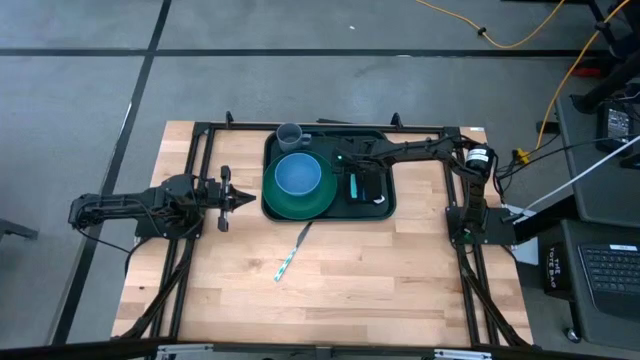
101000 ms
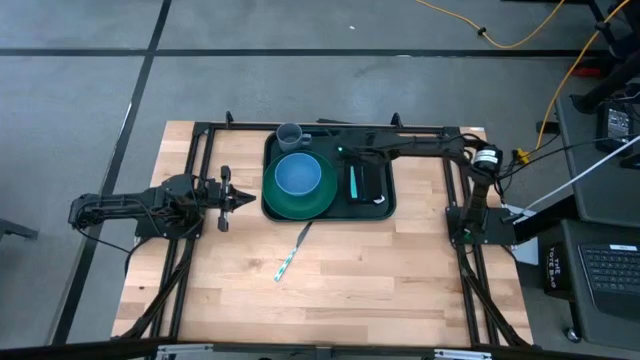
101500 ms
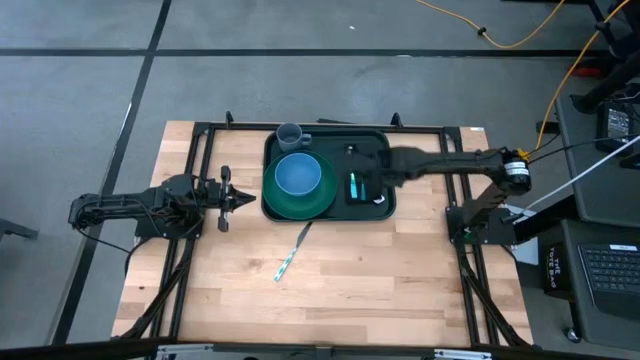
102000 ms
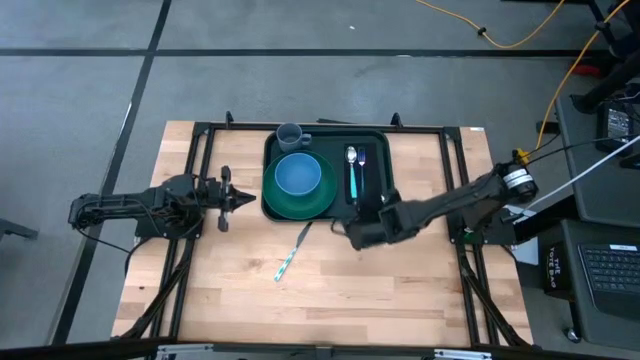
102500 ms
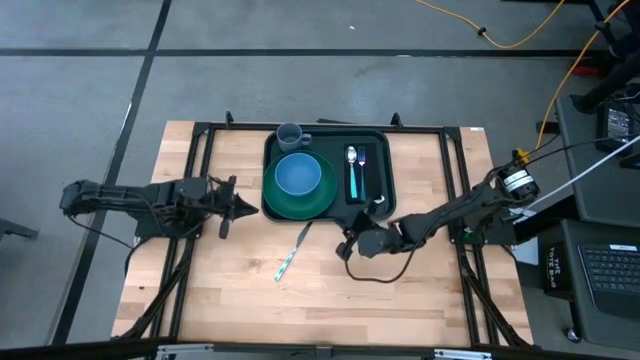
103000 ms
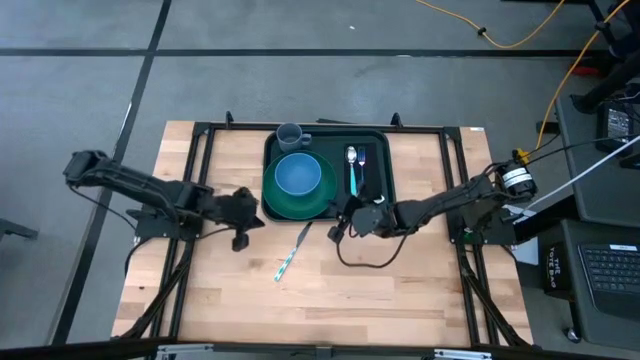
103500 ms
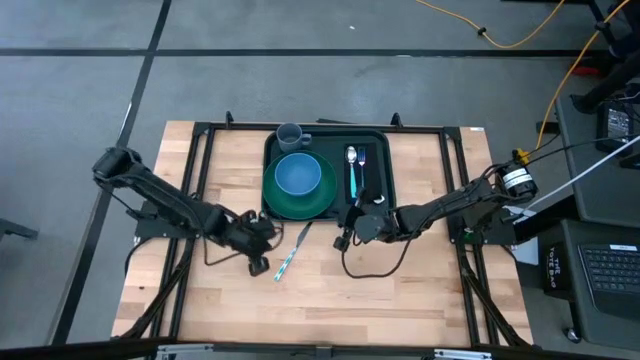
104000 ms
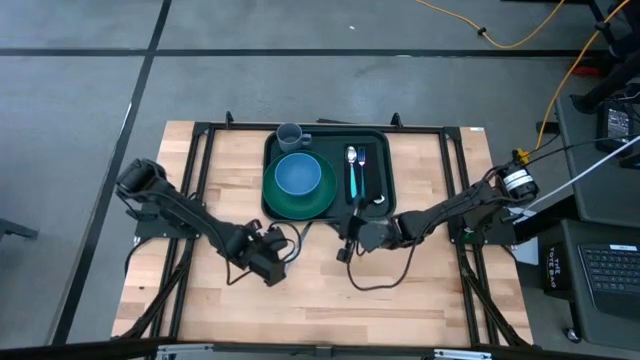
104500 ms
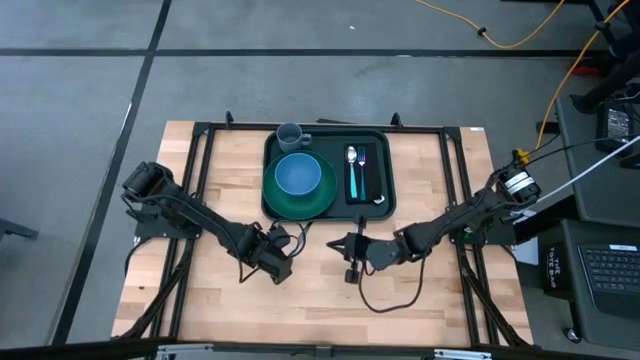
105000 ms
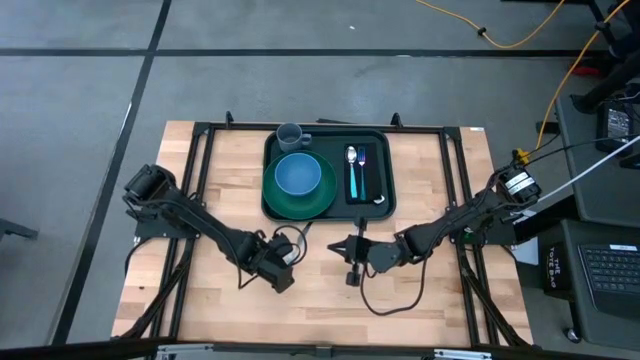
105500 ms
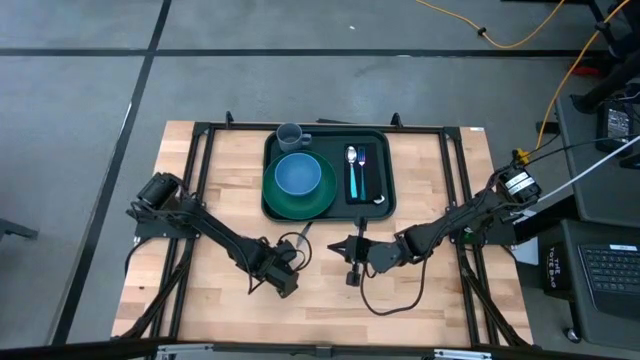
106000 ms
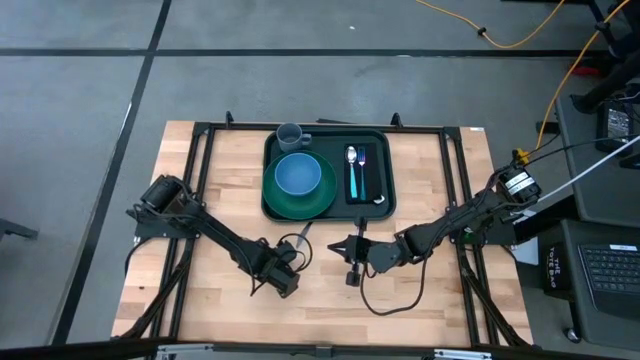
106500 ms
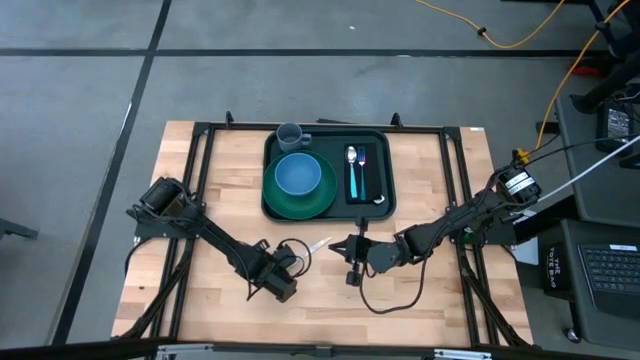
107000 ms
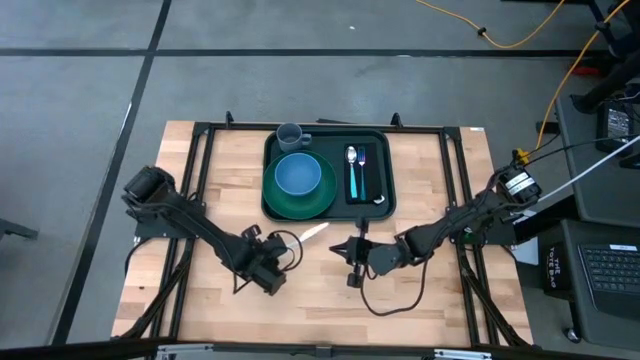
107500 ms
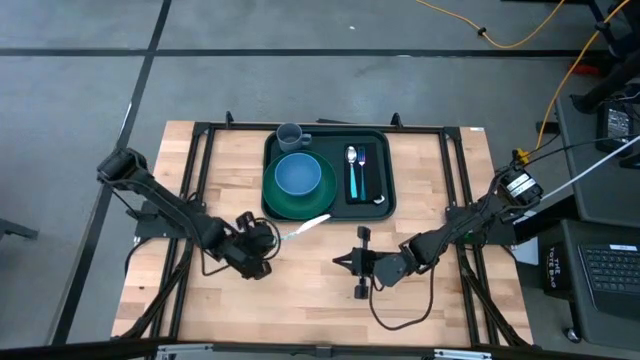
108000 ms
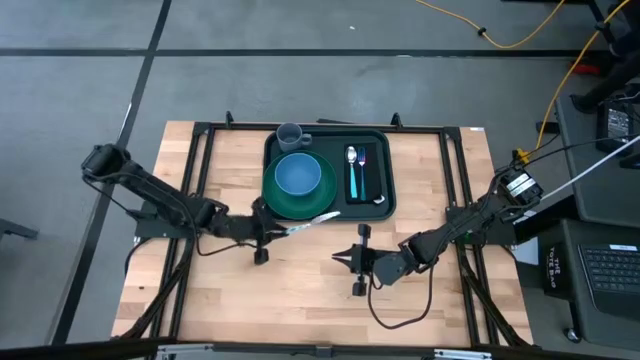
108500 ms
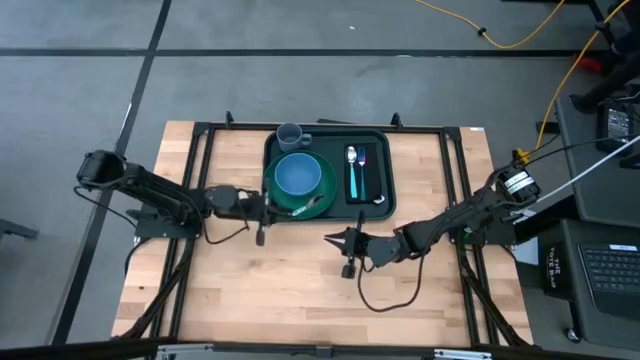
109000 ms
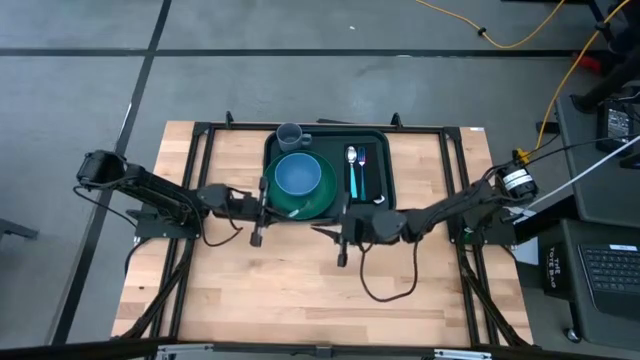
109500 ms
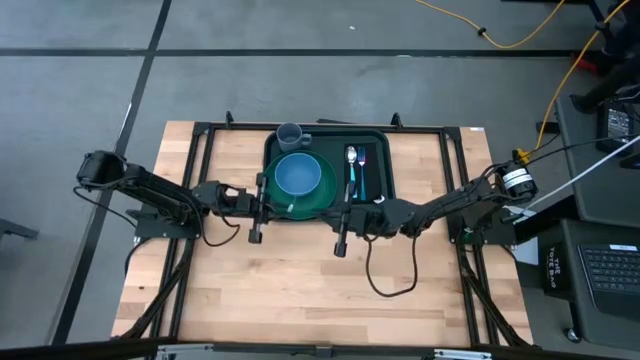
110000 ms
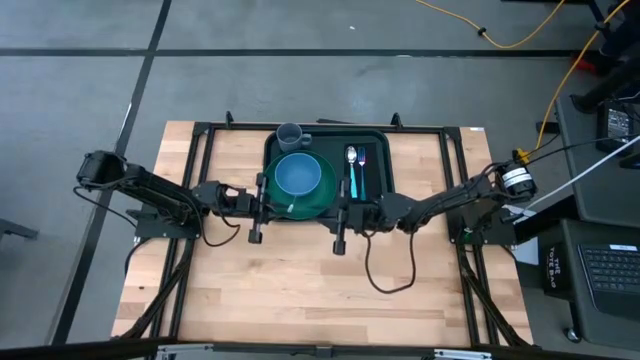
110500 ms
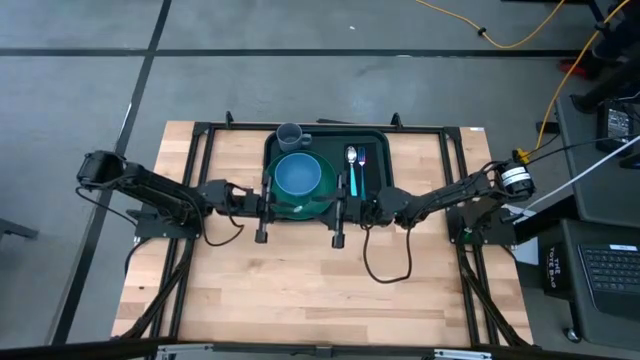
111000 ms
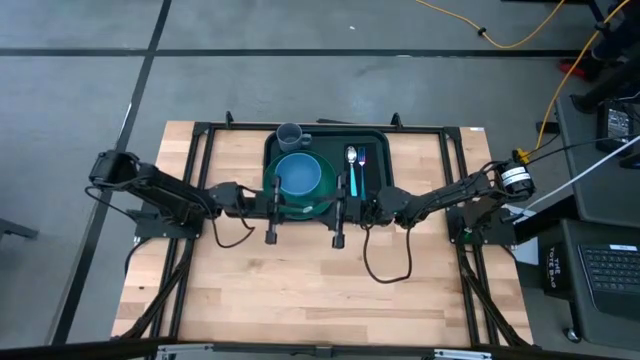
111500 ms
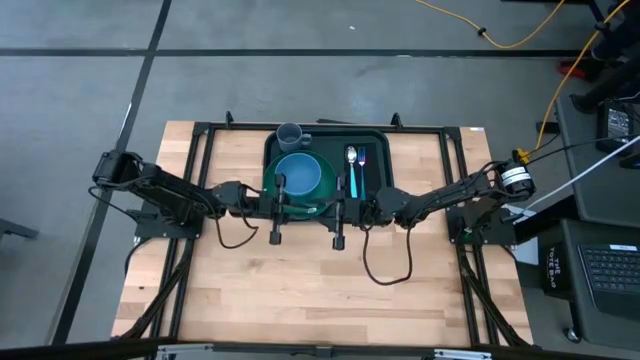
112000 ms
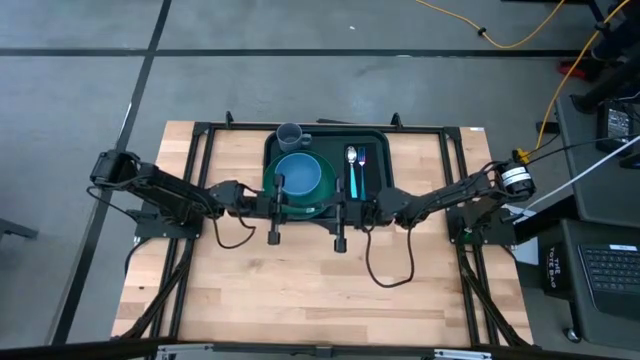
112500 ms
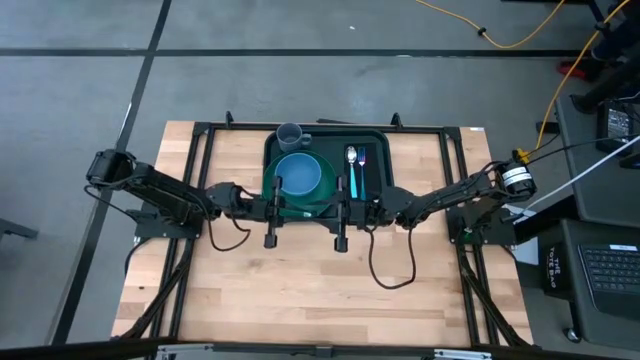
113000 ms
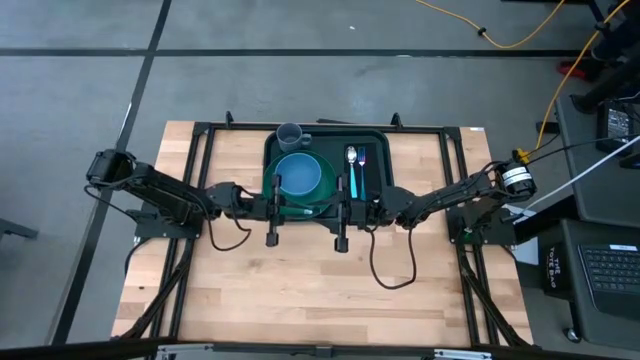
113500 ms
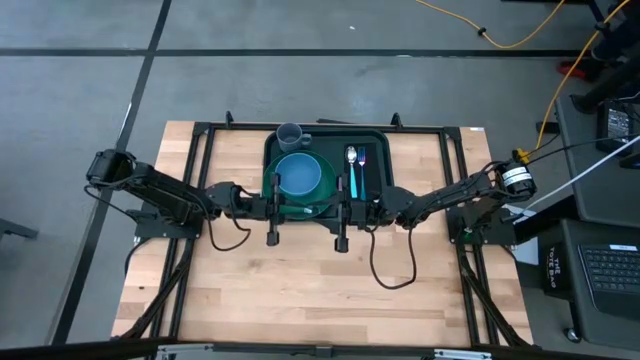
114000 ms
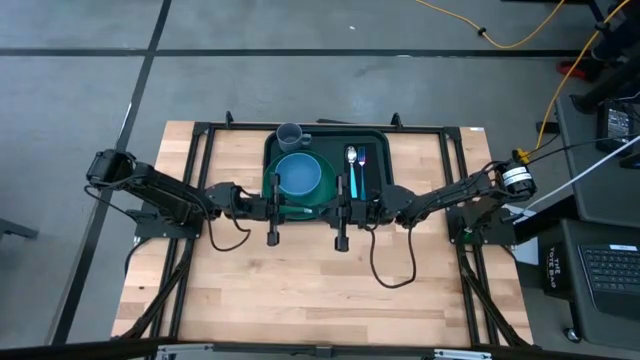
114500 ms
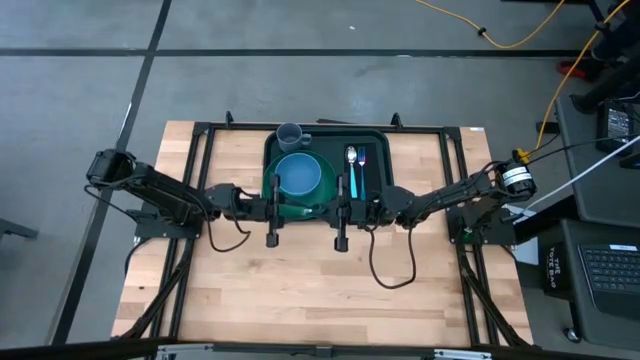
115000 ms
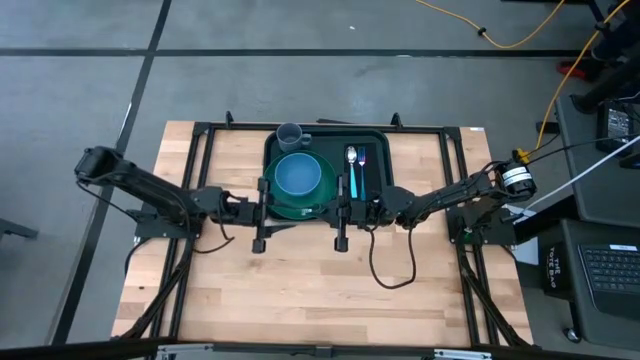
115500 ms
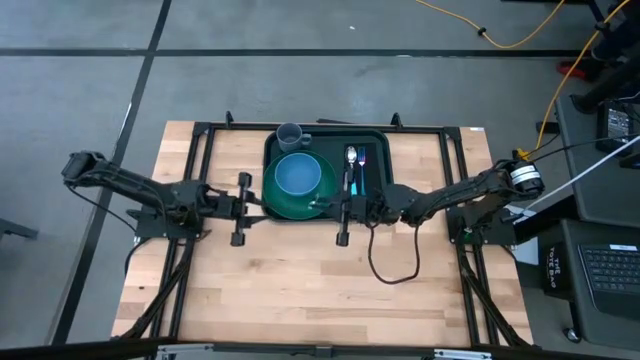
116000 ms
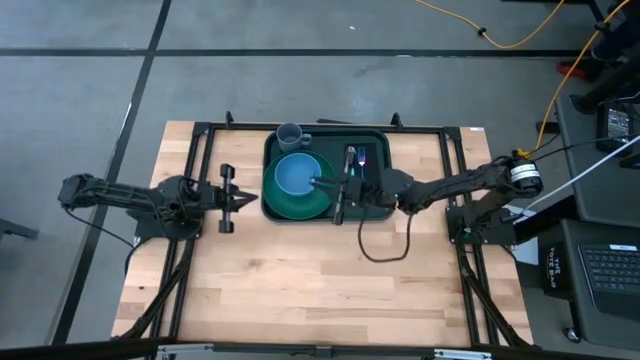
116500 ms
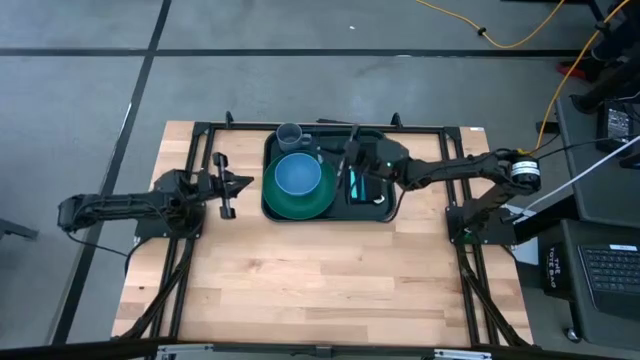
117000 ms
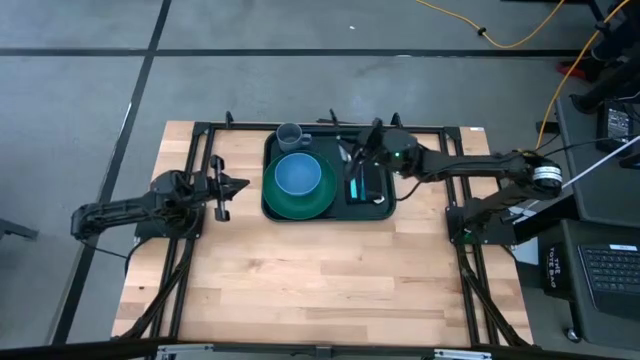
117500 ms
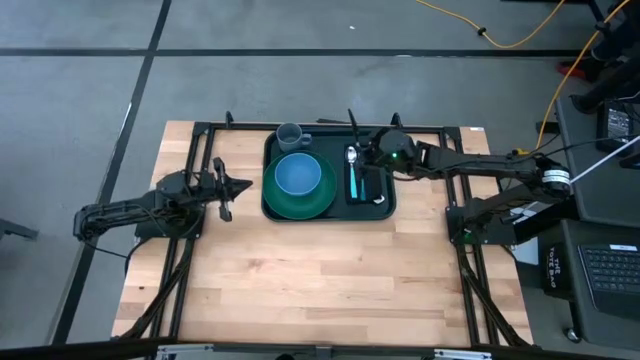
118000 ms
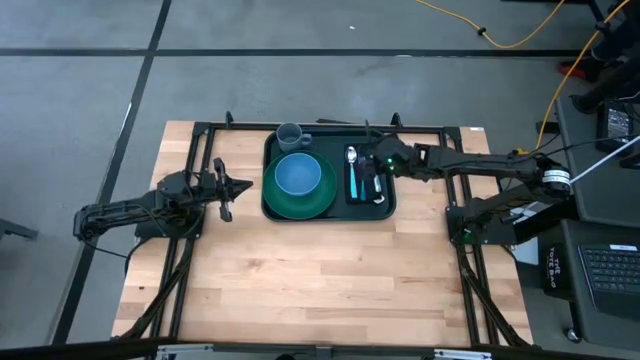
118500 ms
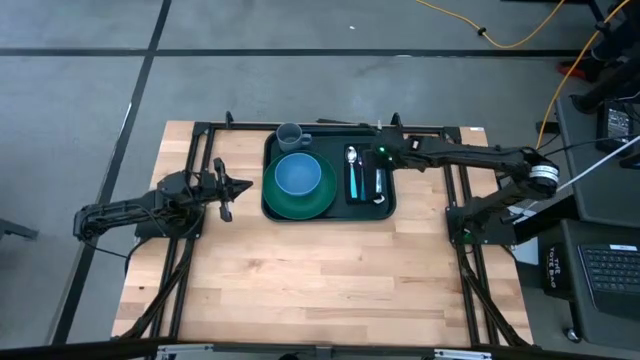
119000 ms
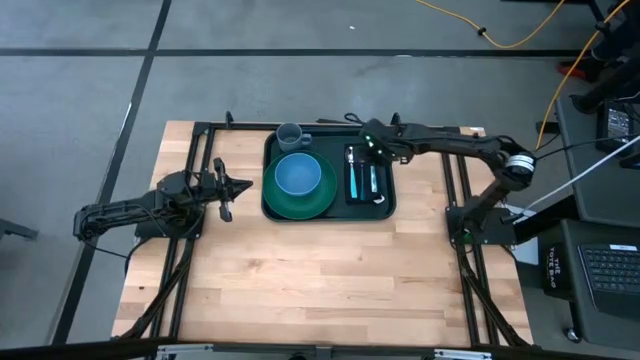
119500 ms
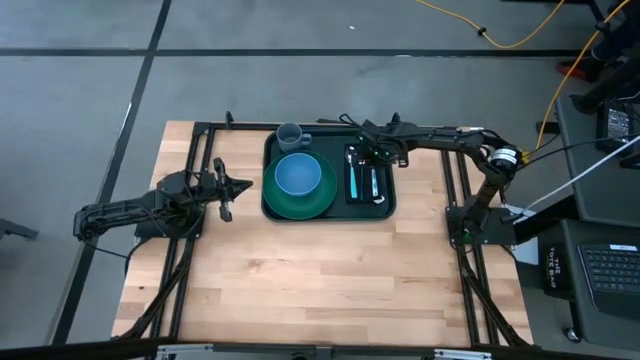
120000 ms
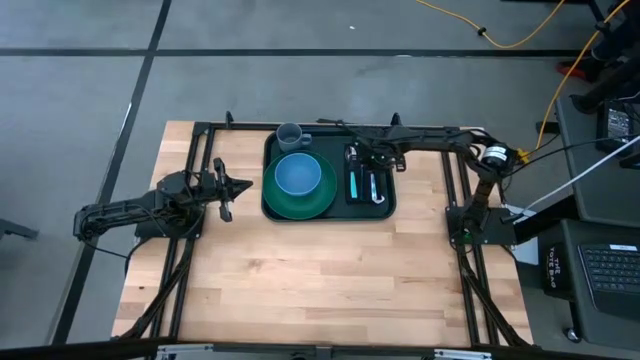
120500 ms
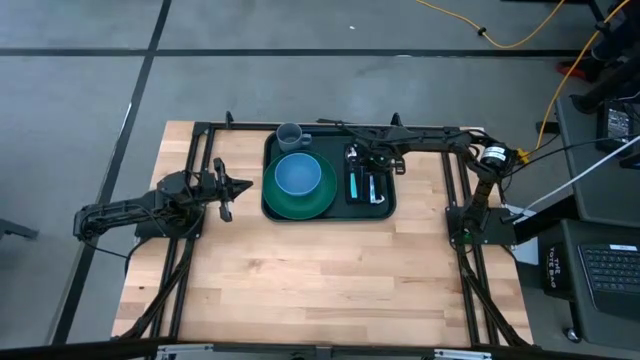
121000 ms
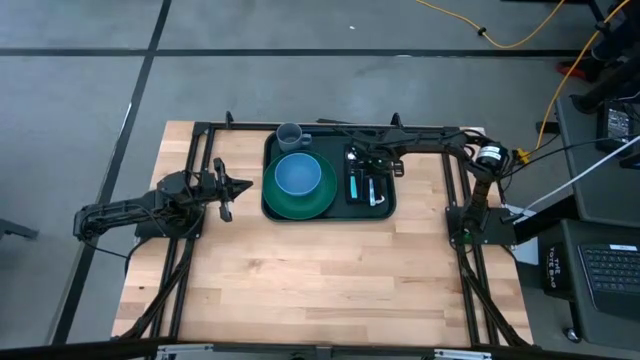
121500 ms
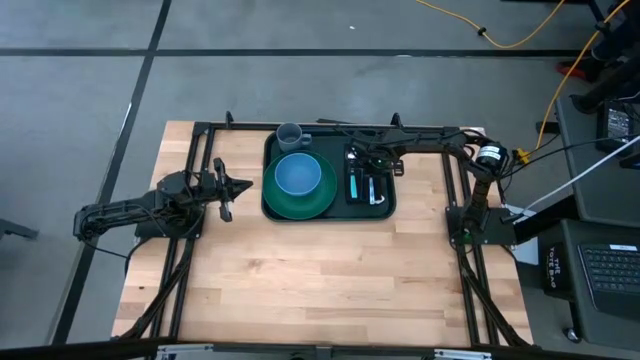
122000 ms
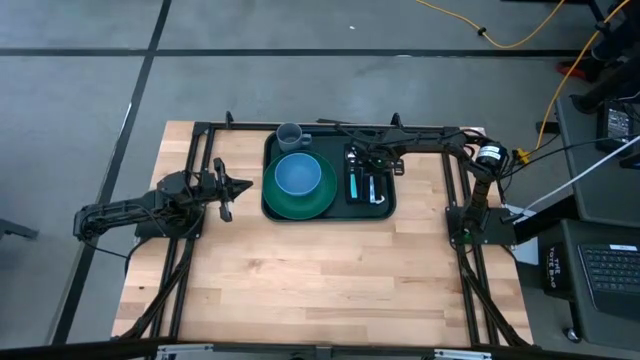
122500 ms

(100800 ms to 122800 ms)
Task: Set up tray
Put the knife on the napkin to the right of the fork
